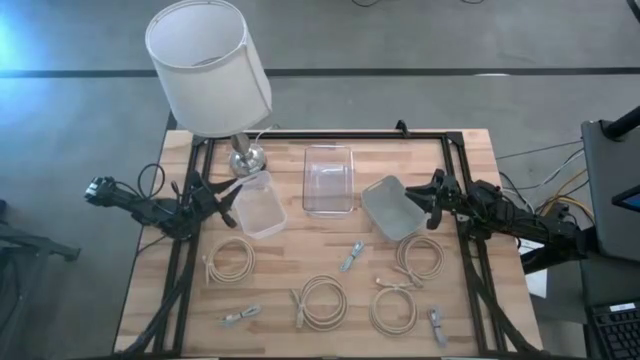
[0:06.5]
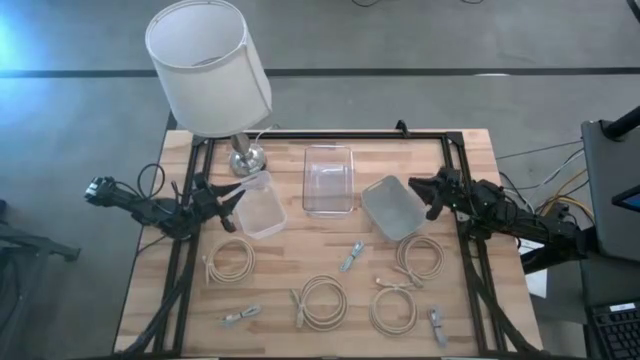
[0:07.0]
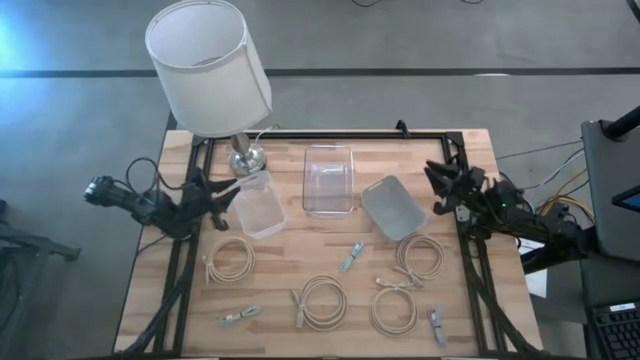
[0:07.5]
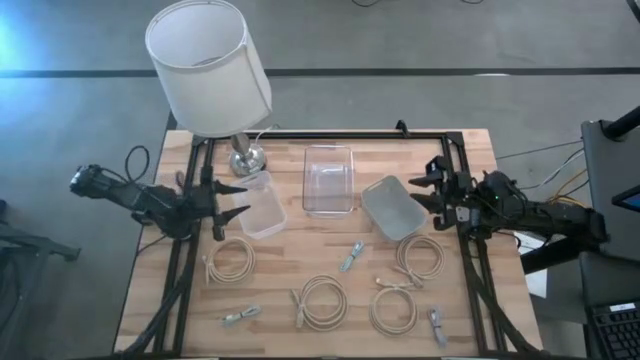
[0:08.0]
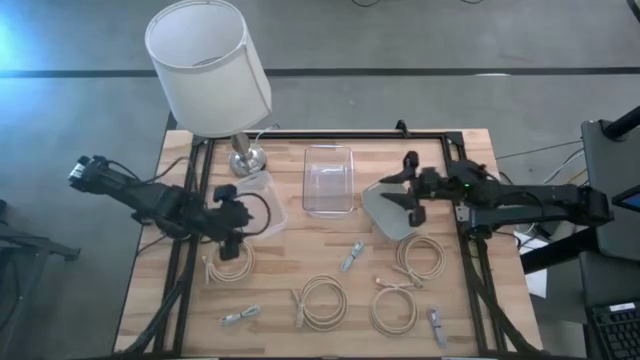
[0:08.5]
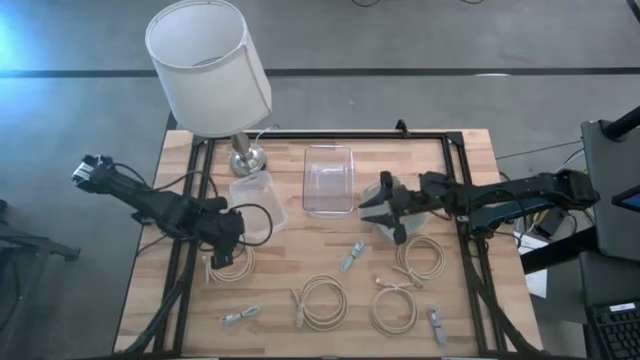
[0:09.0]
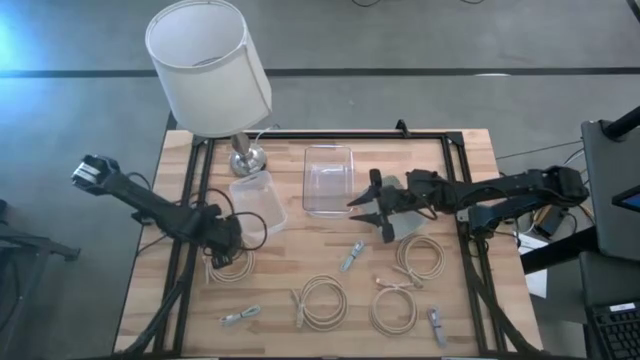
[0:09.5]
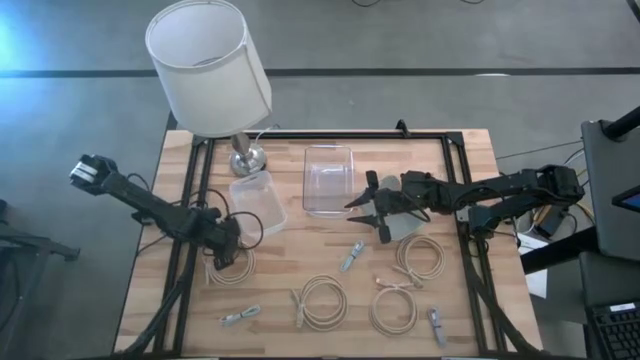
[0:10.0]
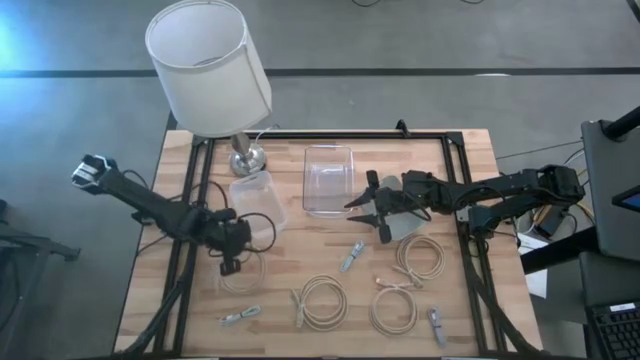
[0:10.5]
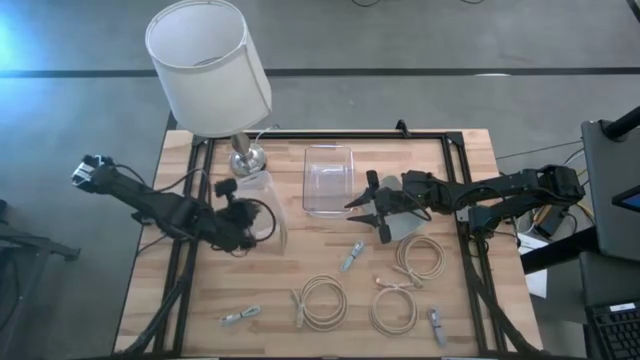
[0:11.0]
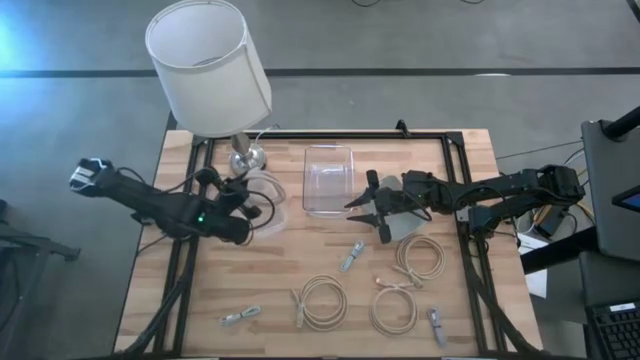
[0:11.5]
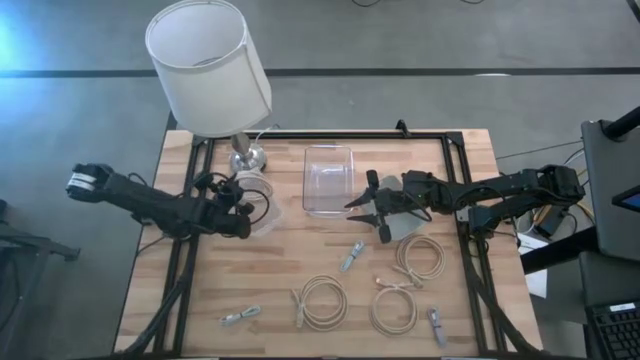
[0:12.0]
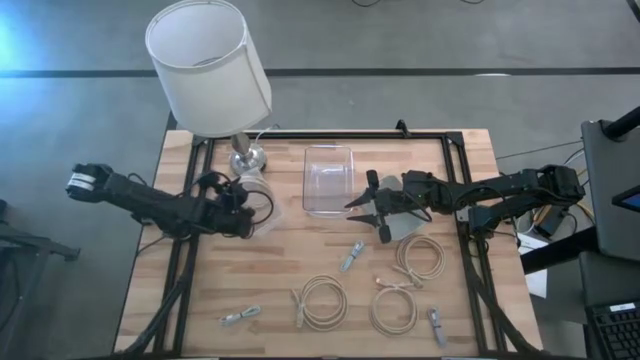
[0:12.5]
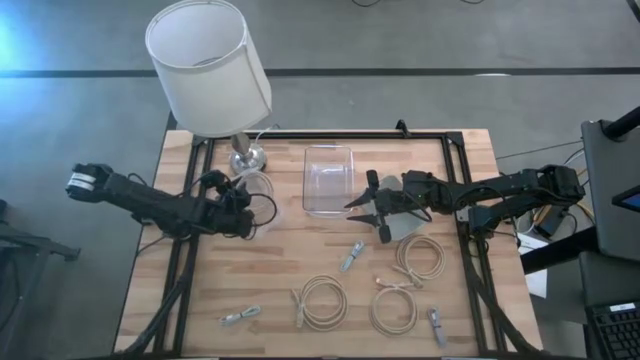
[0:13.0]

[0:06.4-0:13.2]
Task: Pick & Place USB Port
Put the brown HDMI cable into the white bin

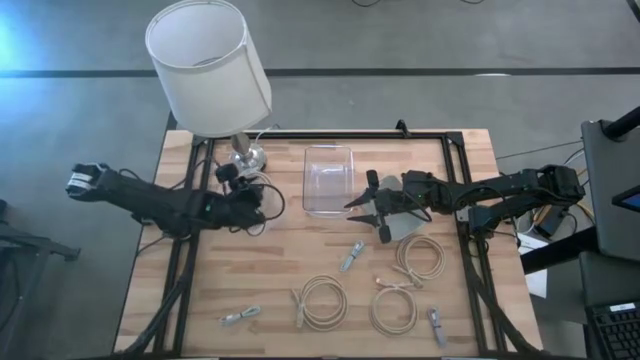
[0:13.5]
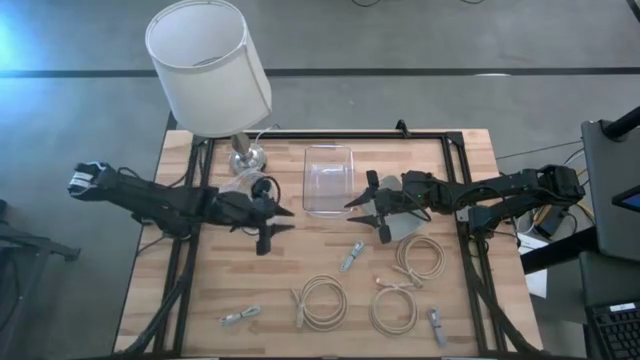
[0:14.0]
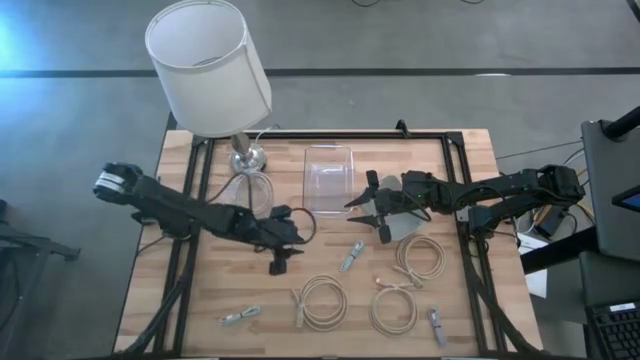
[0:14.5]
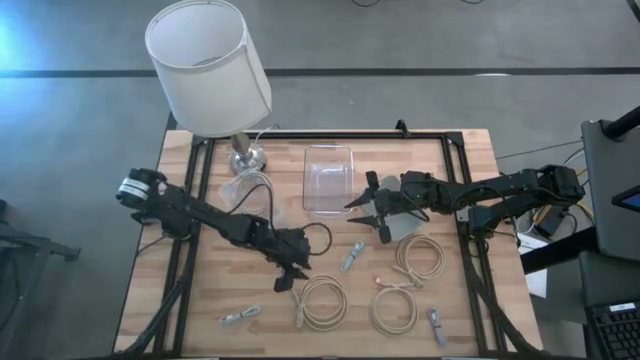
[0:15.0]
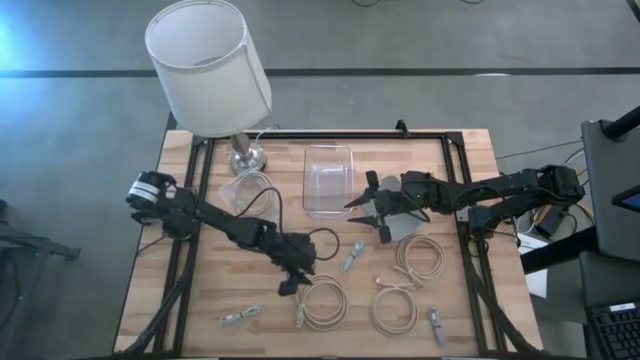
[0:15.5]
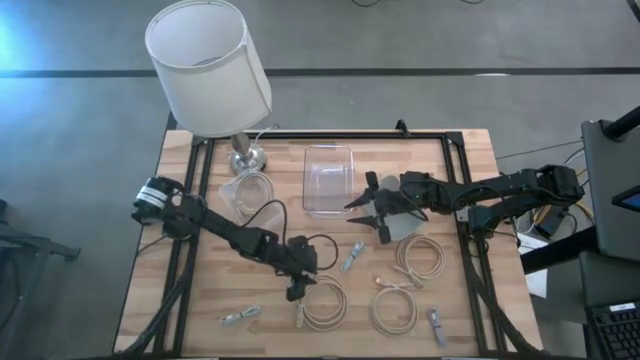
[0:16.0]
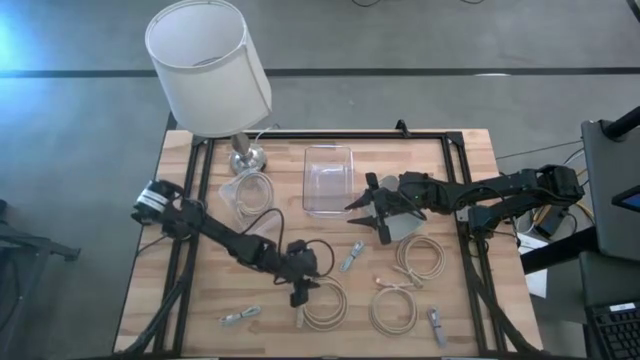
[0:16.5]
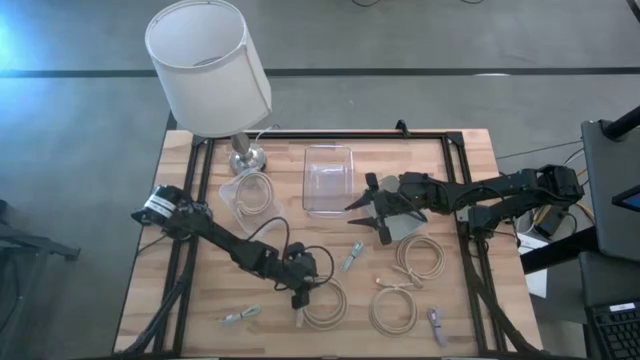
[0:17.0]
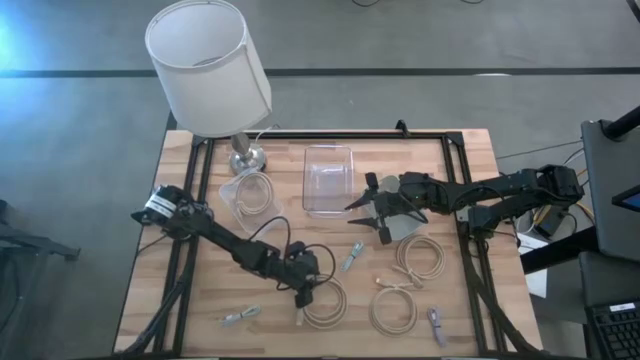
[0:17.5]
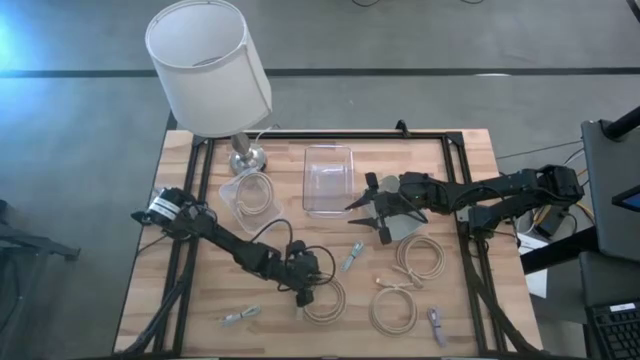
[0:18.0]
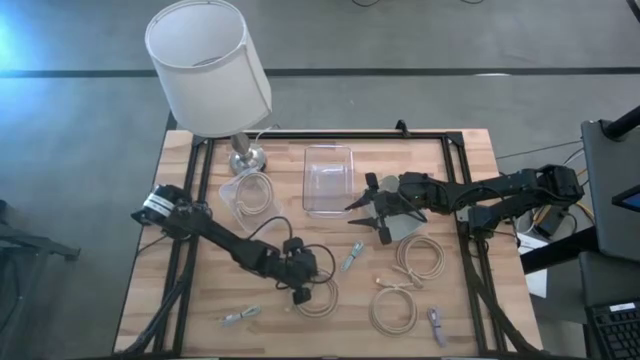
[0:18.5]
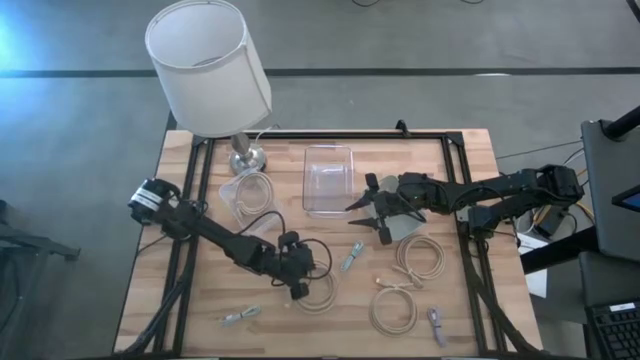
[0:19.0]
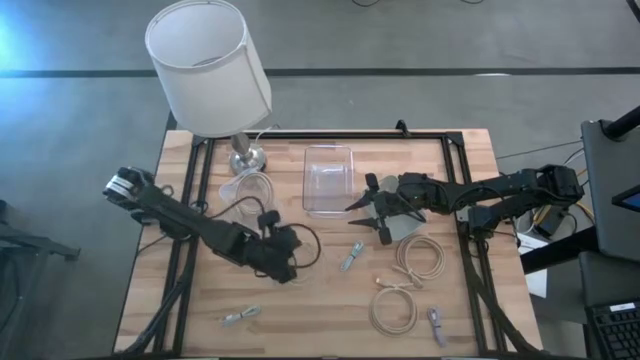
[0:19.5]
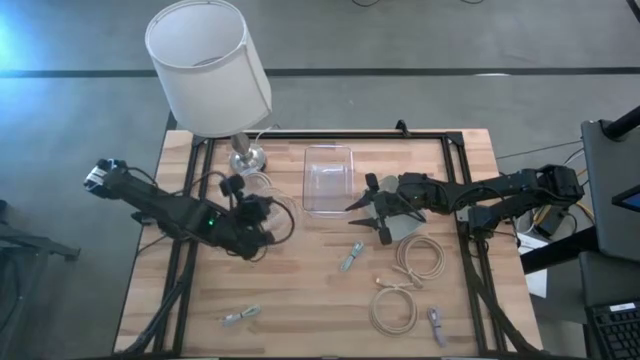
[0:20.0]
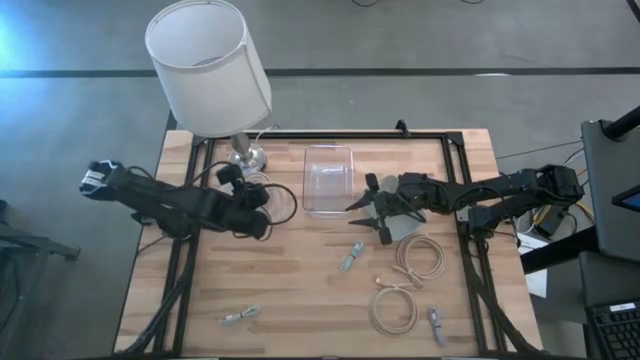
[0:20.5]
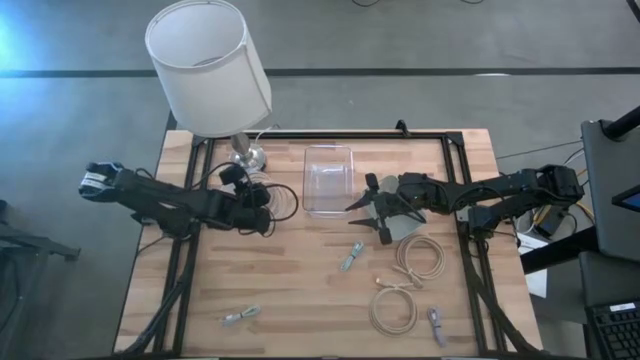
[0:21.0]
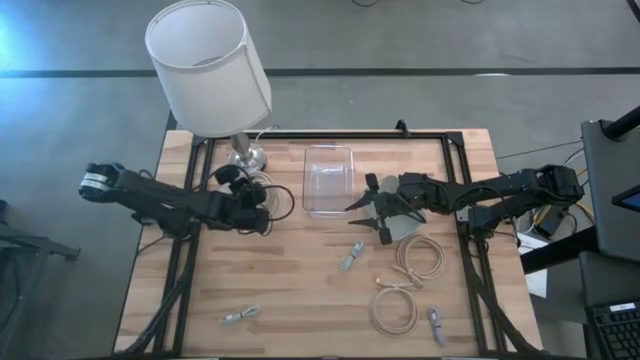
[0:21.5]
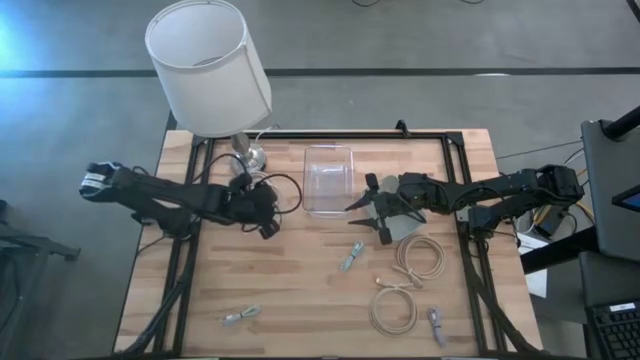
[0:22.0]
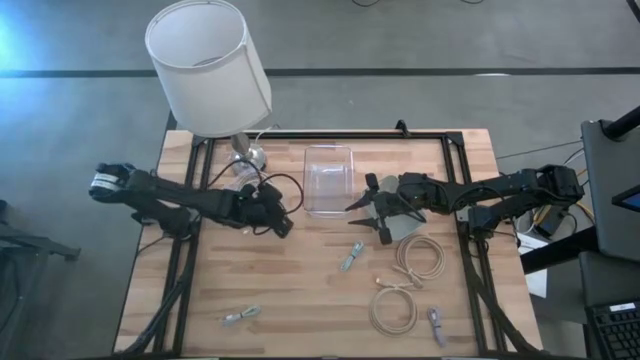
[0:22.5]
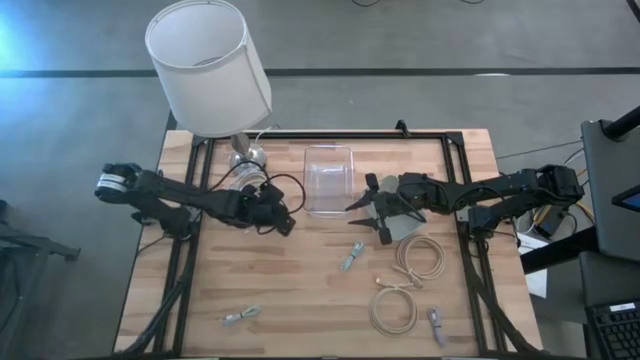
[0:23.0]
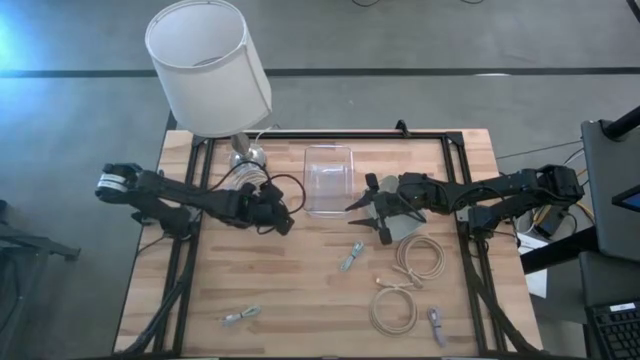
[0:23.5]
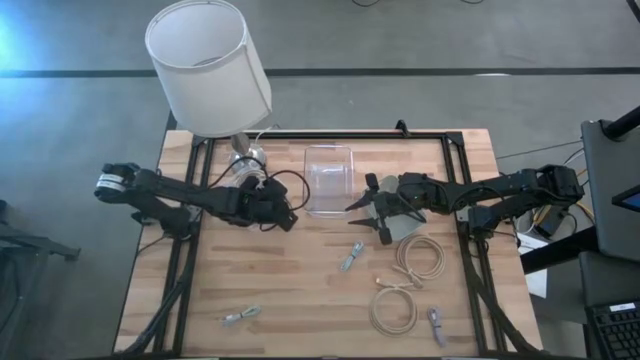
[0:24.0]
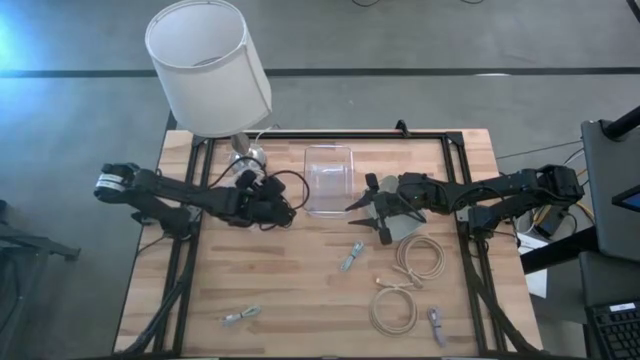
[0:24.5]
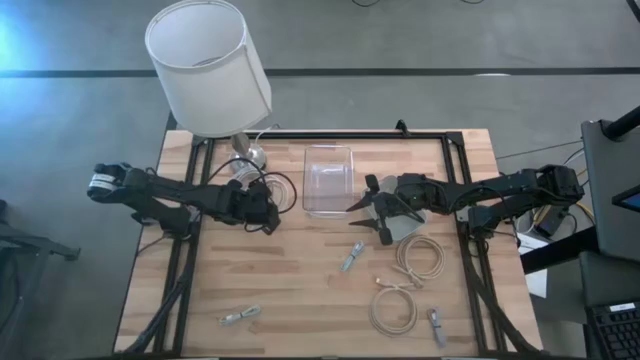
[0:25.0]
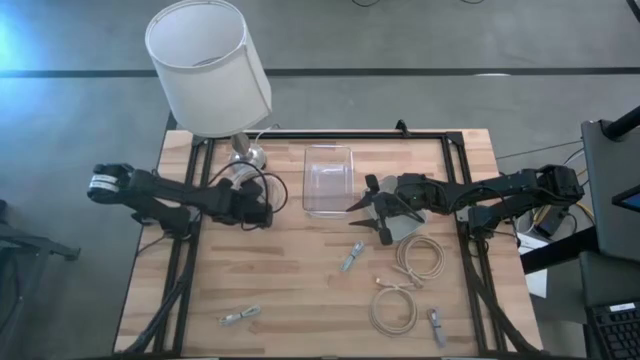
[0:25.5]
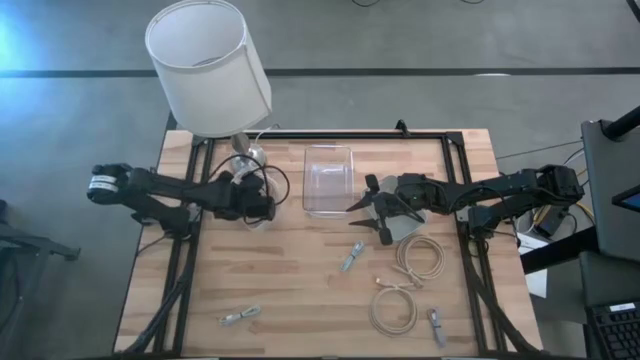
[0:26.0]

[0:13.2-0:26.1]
Put the brown HDMI cable into the white bin

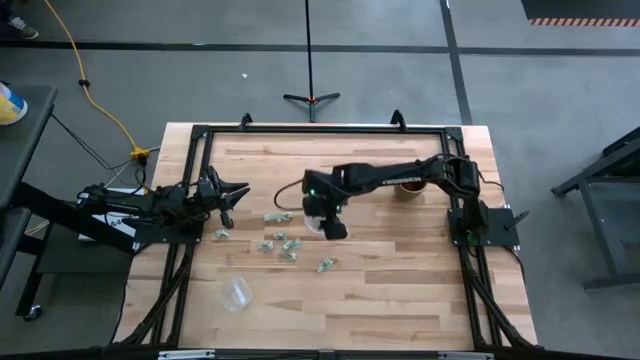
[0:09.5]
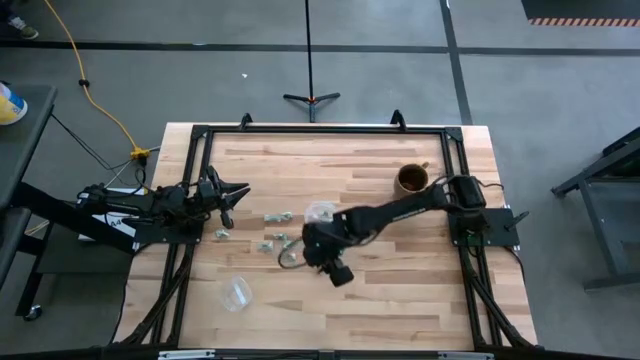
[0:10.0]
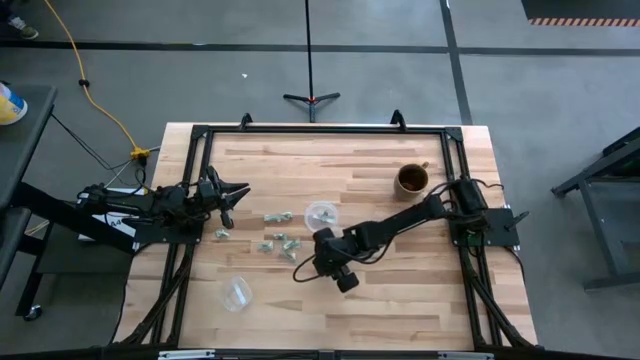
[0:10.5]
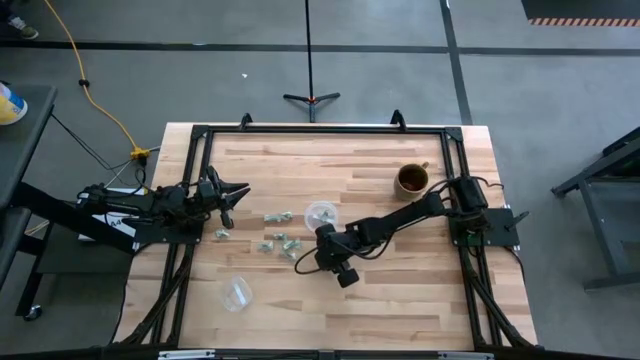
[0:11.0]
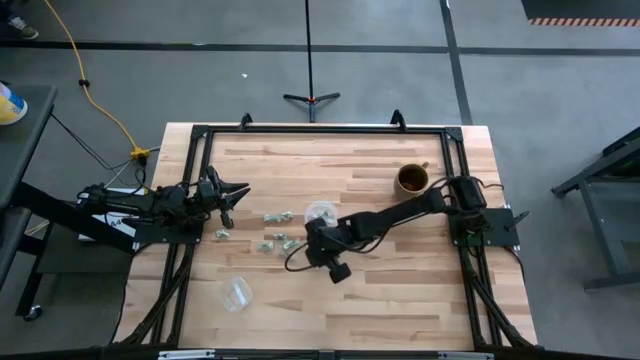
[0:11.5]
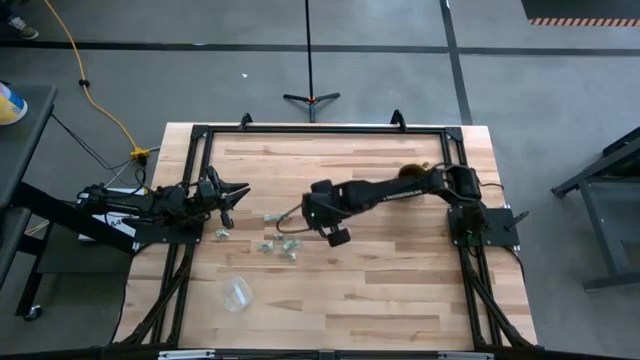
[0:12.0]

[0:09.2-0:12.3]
Task: Pick and place items into bin
Put the green stevia packet into the top transparent bin
